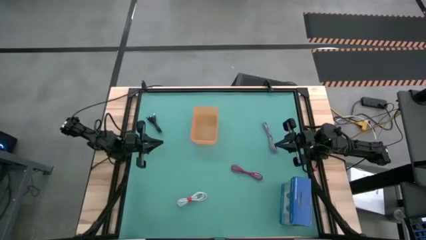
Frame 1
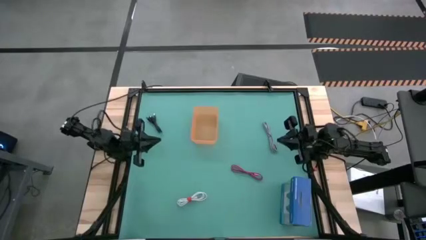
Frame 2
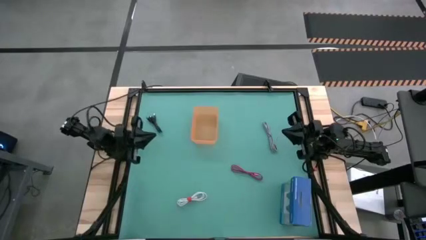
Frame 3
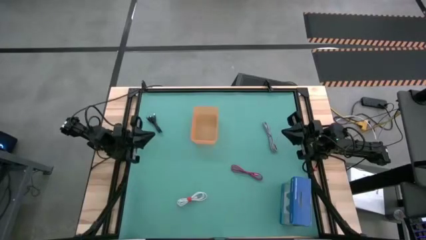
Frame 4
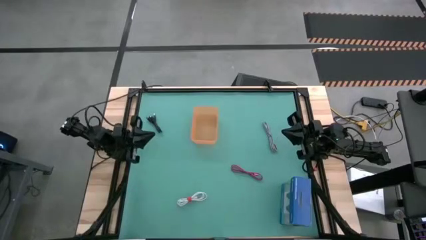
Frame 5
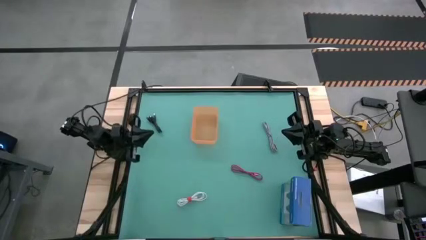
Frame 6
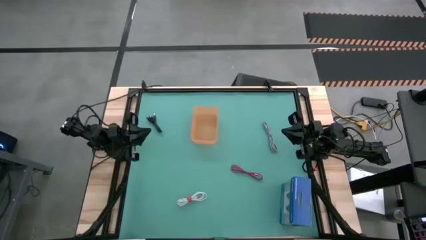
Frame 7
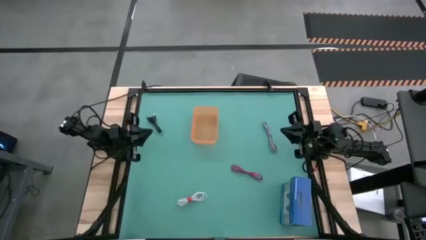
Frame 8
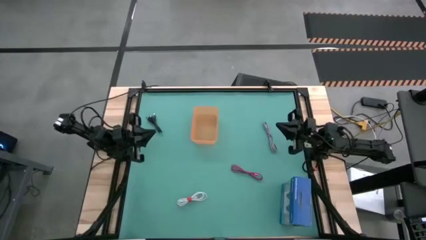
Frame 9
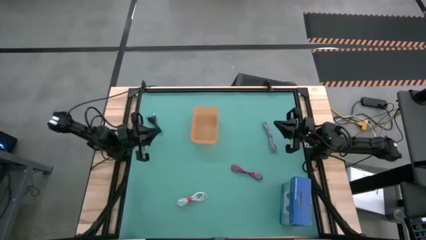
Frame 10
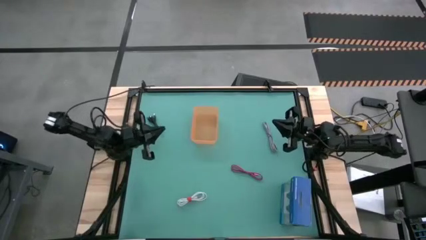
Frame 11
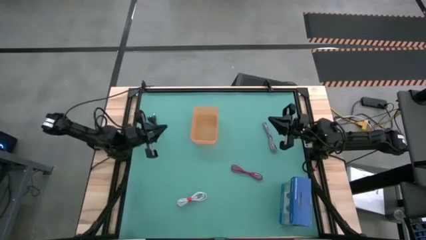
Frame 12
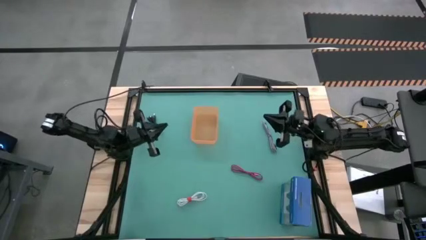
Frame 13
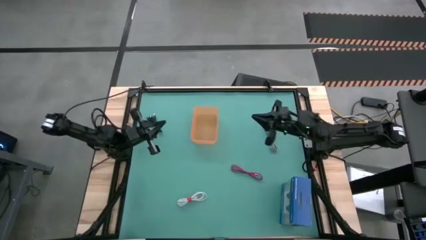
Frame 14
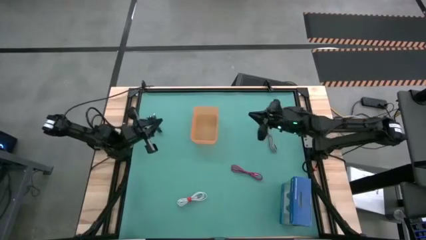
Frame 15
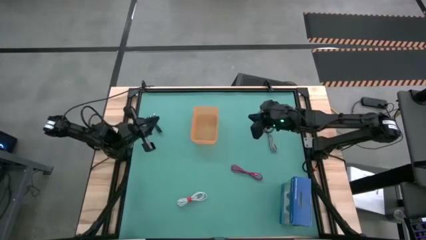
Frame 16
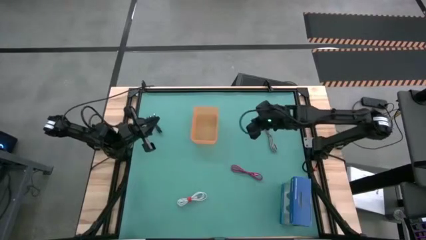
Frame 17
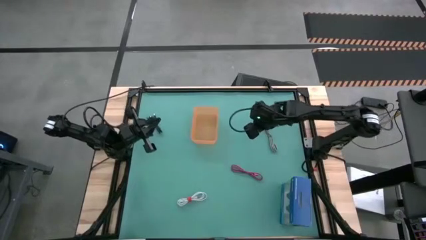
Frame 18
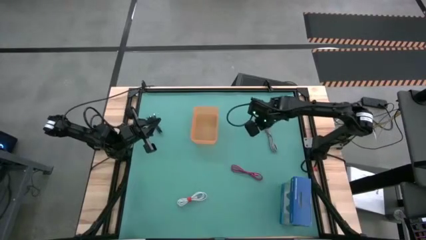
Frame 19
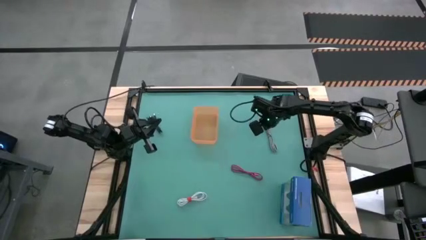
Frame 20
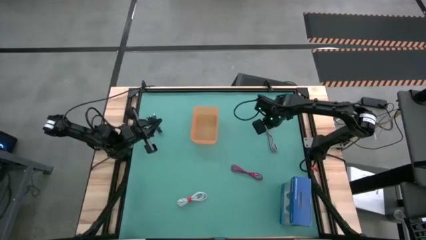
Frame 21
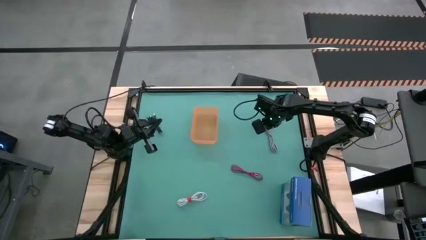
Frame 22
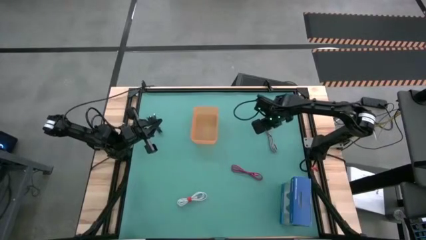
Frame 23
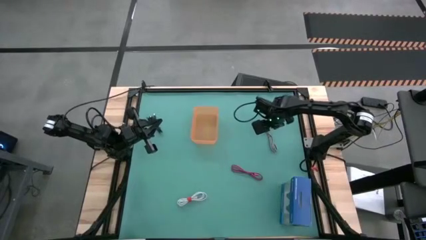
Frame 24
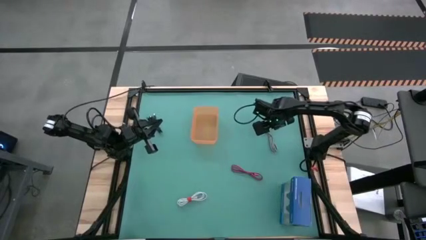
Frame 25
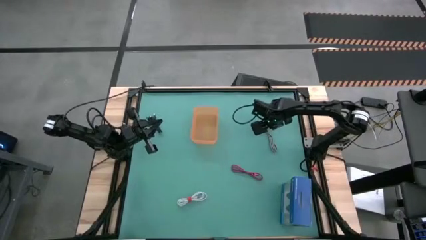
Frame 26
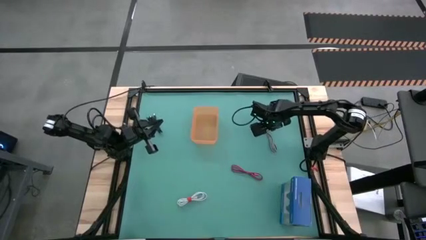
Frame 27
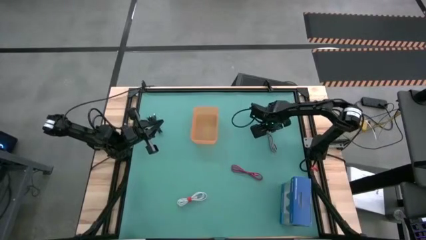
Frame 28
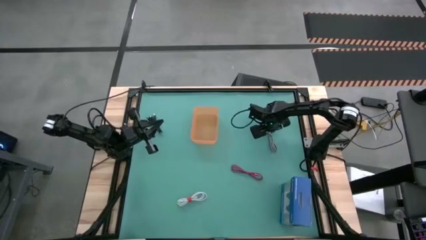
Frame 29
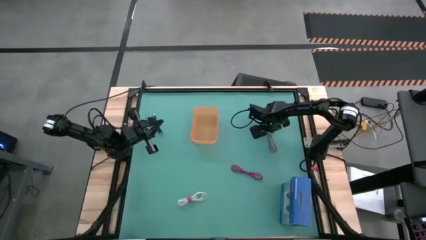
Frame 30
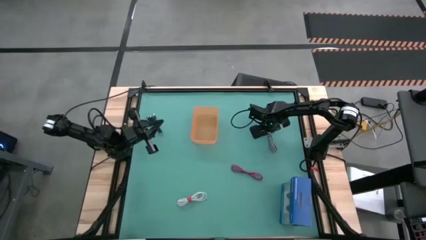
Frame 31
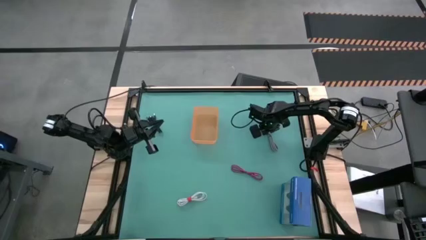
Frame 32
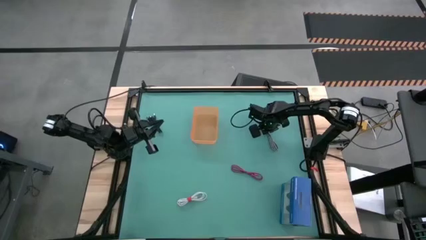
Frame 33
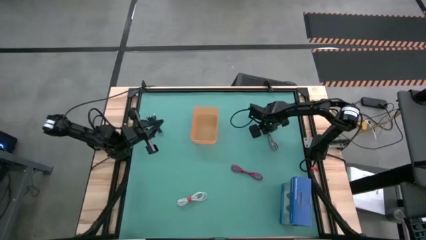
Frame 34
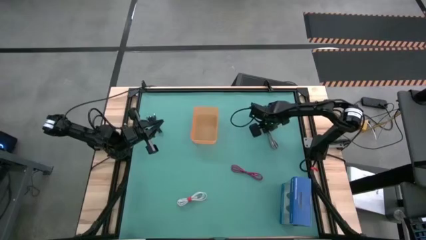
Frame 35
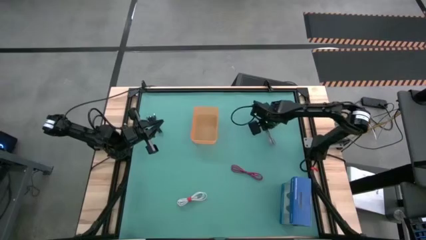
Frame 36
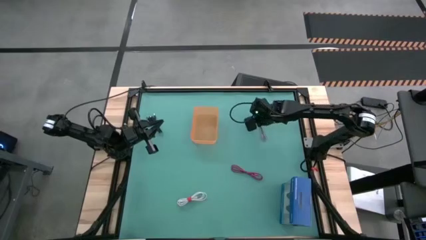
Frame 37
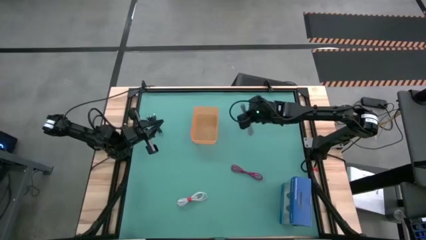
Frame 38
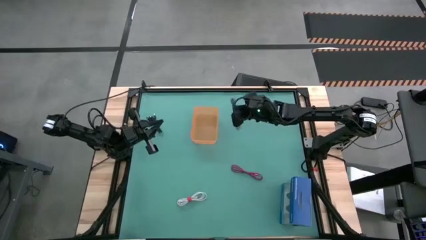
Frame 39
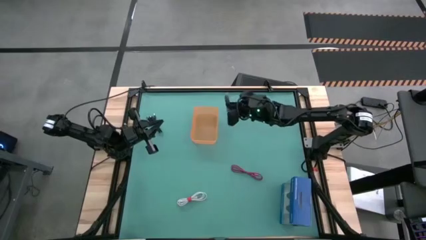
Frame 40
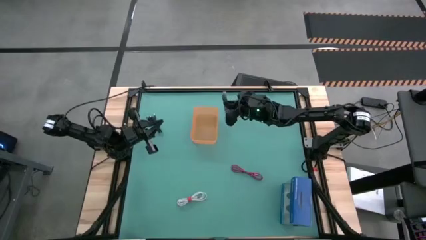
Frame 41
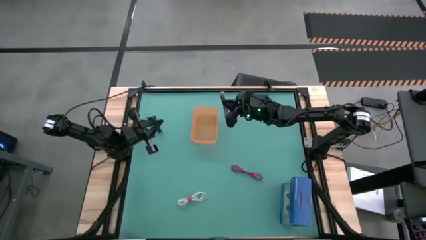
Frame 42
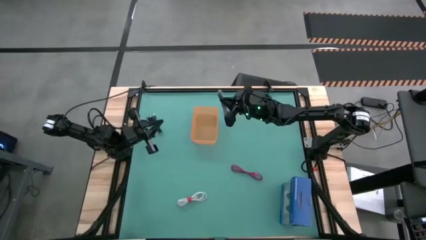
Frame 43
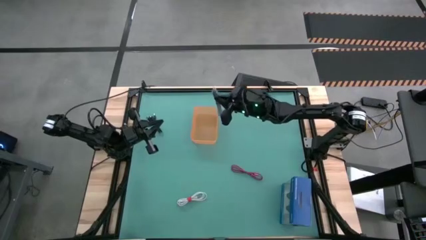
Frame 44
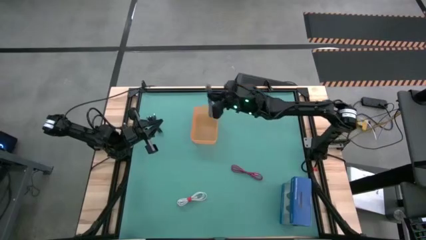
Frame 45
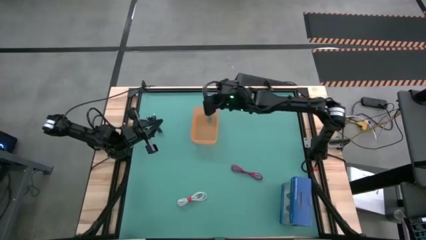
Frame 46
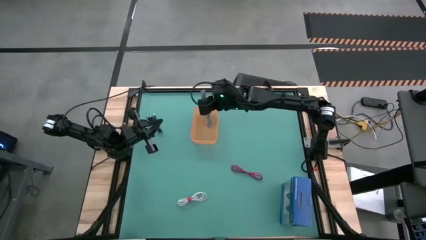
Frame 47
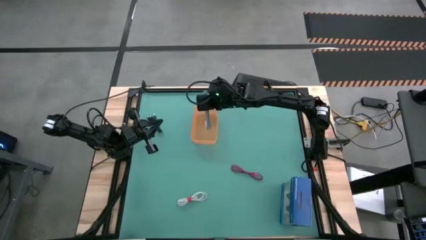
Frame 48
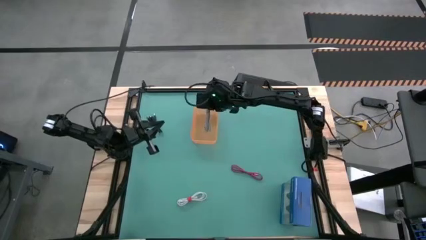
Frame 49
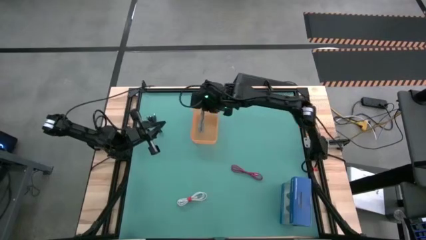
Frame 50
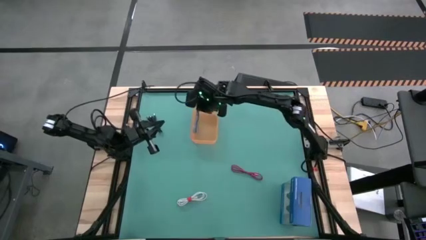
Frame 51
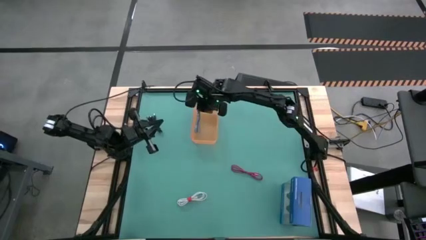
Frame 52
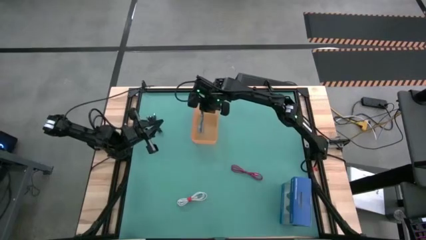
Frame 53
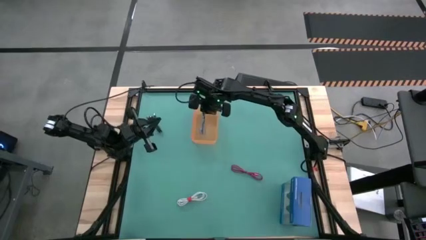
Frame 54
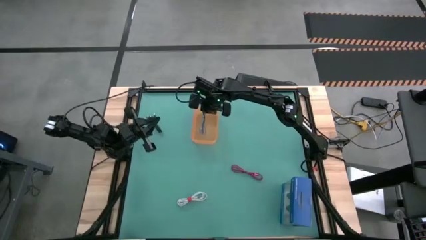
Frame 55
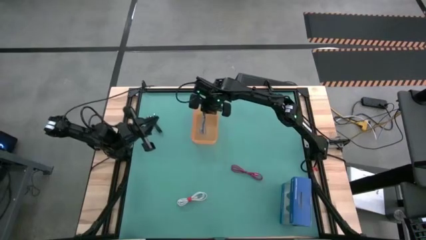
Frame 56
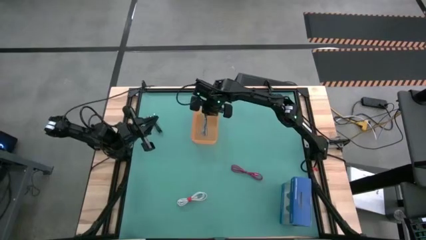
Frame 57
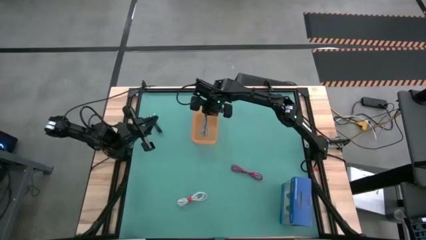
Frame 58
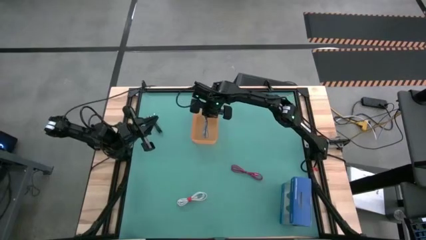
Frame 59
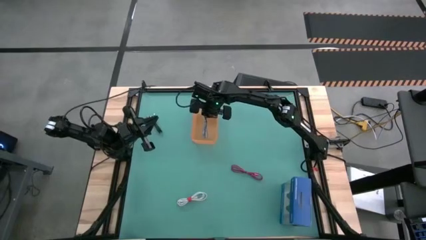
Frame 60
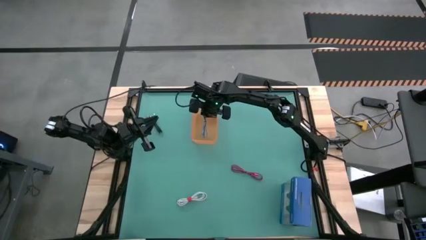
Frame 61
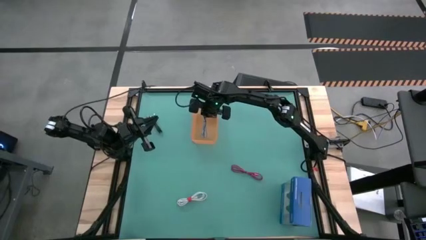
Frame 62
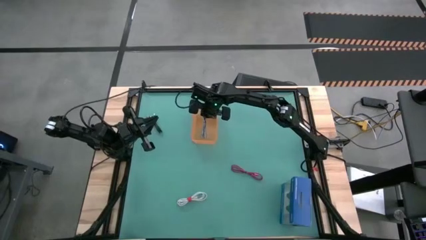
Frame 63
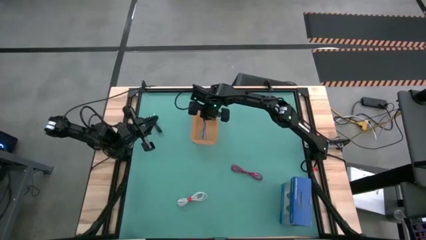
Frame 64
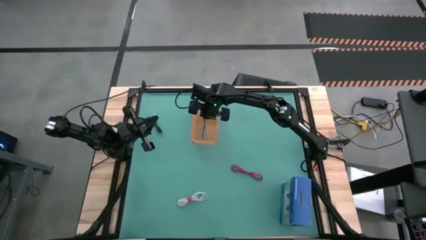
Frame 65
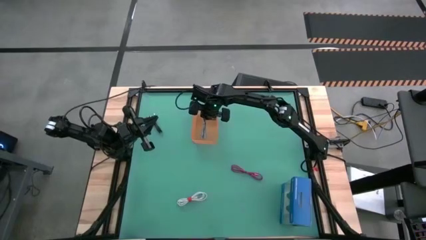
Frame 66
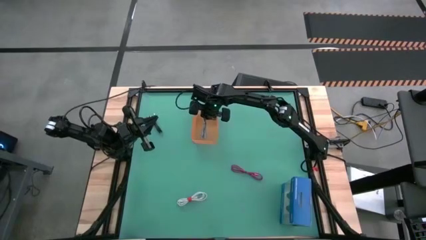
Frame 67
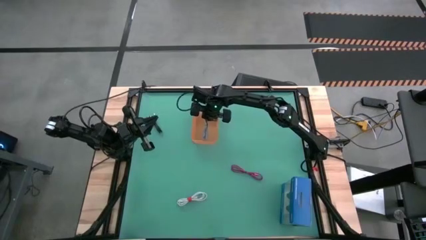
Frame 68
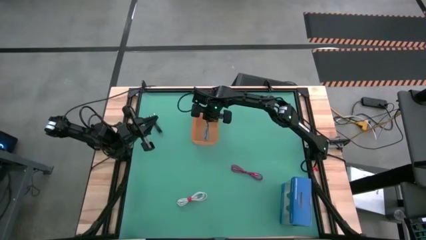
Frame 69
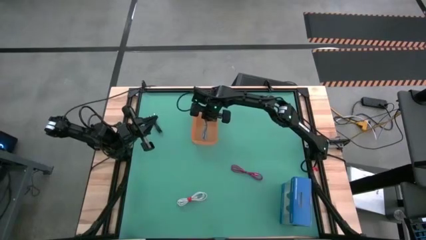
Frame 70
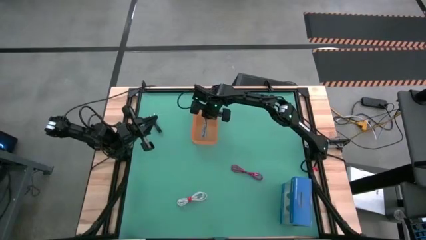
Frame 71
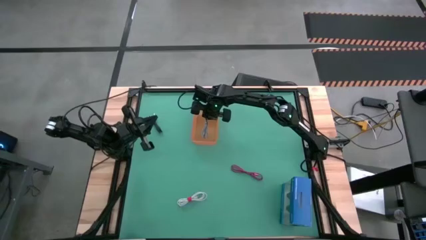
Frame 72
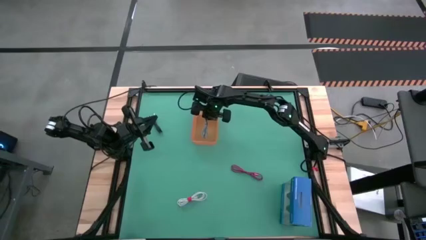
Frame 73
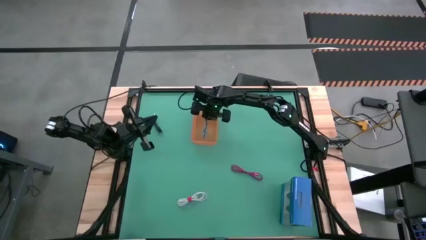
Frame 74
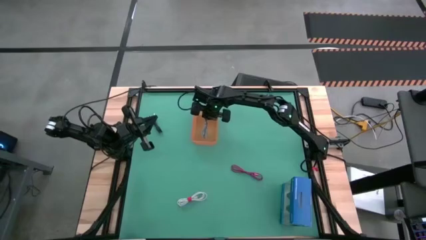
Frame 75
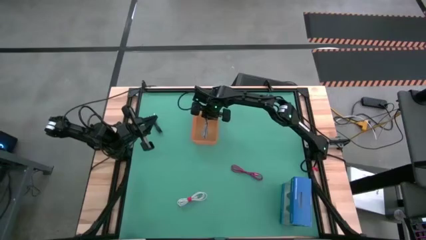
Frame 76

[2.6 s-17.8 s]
Task: Pick and place USB-C Cables
Put the black and white charger cable into the orange bin
